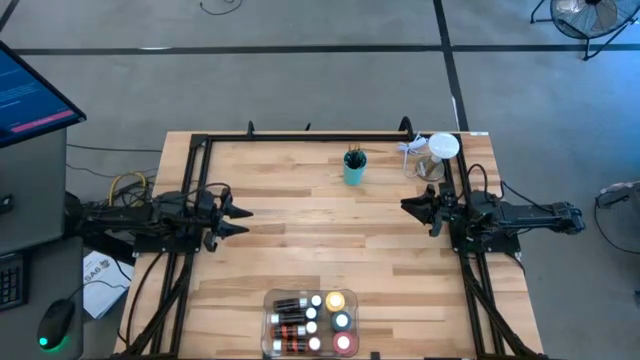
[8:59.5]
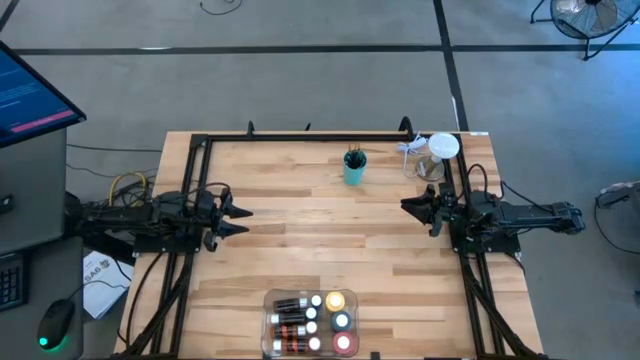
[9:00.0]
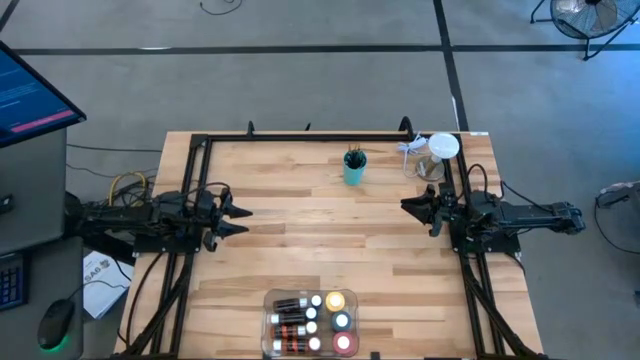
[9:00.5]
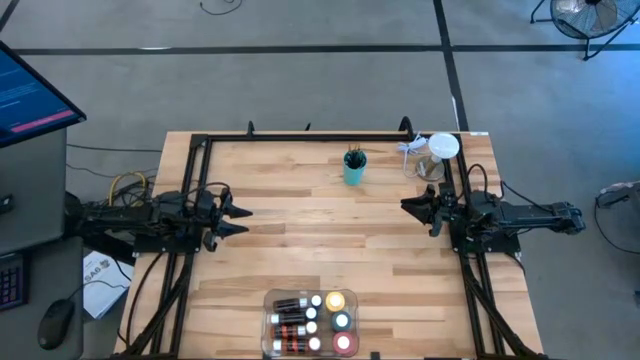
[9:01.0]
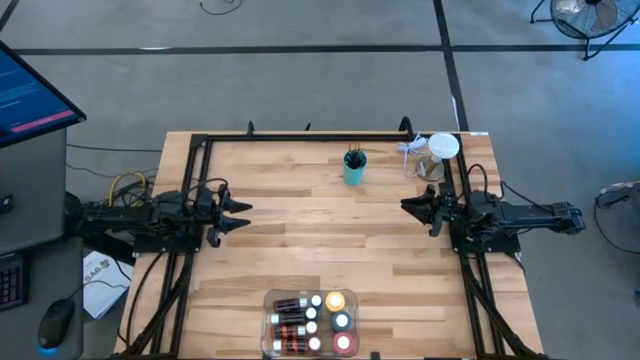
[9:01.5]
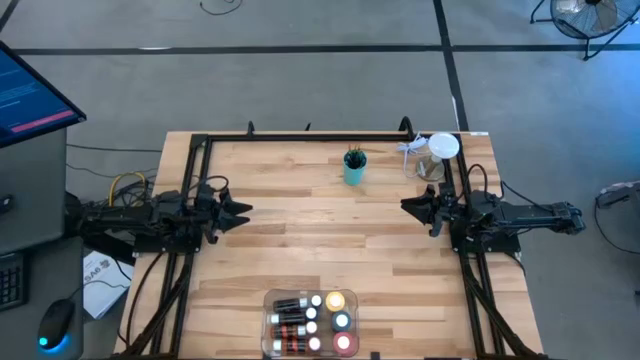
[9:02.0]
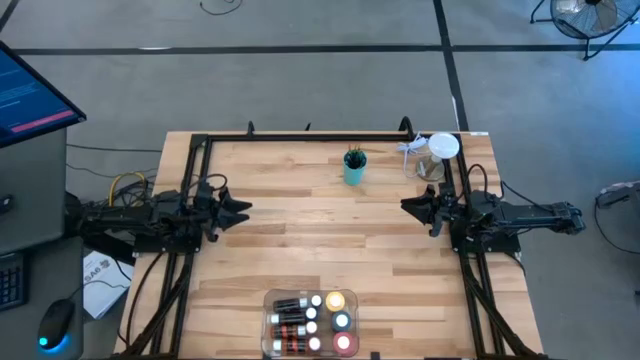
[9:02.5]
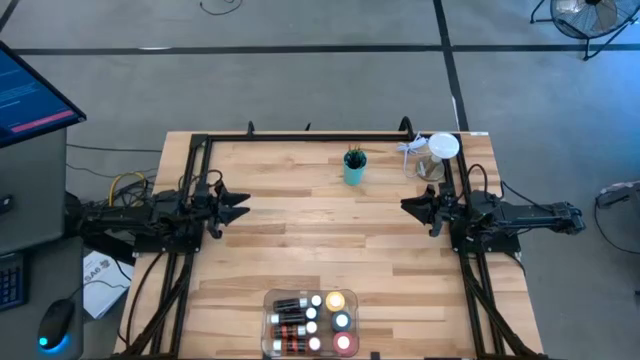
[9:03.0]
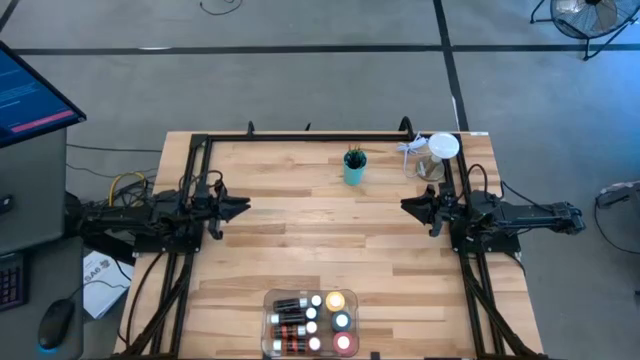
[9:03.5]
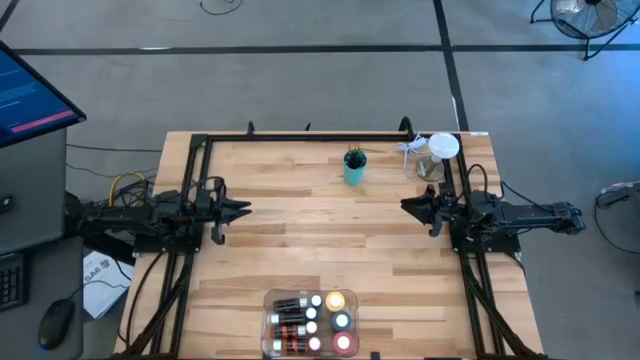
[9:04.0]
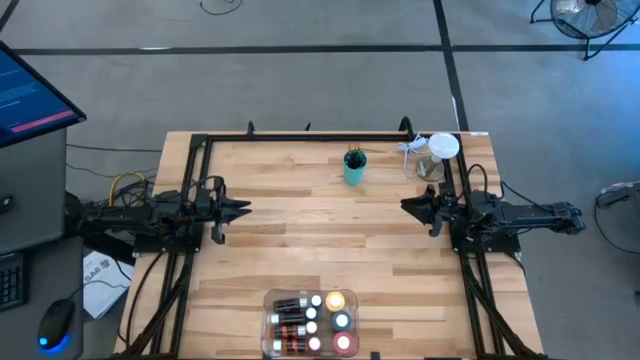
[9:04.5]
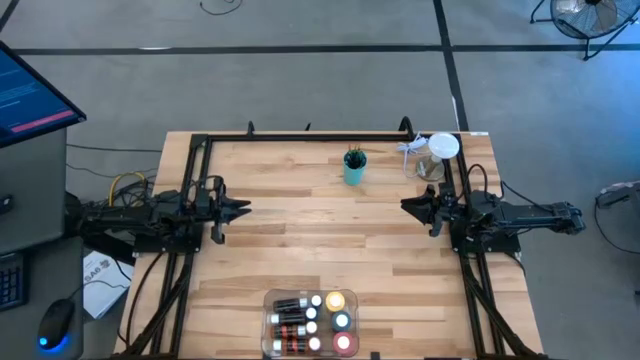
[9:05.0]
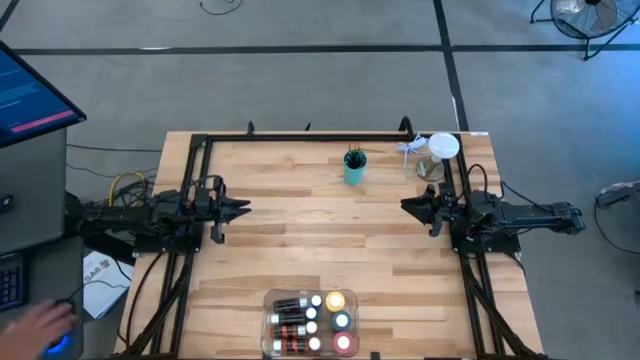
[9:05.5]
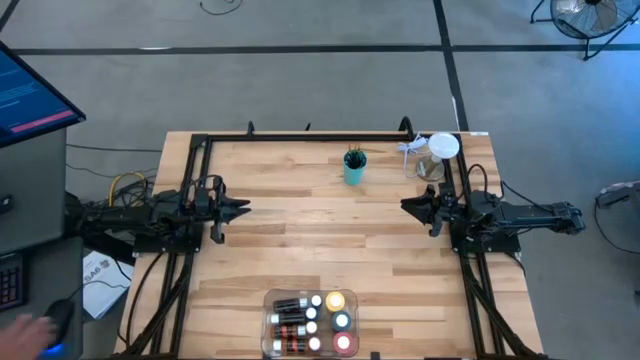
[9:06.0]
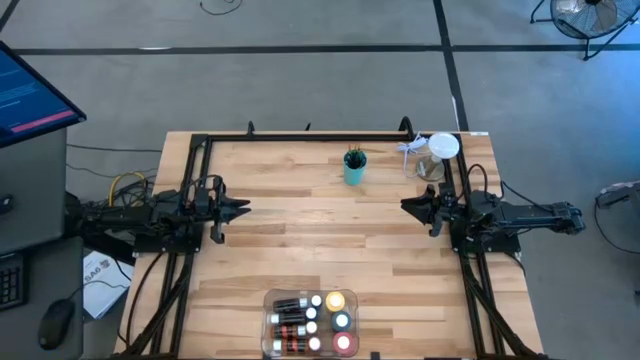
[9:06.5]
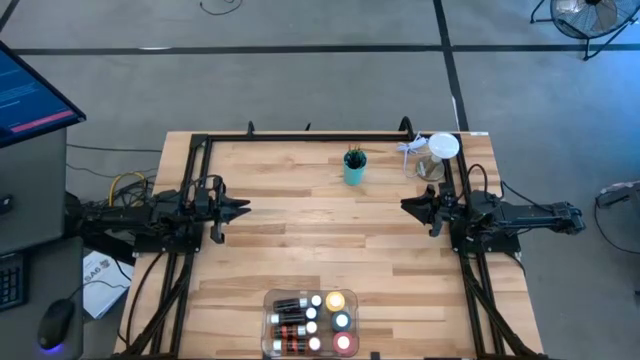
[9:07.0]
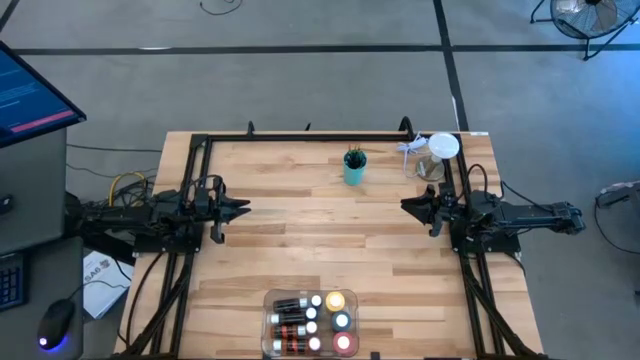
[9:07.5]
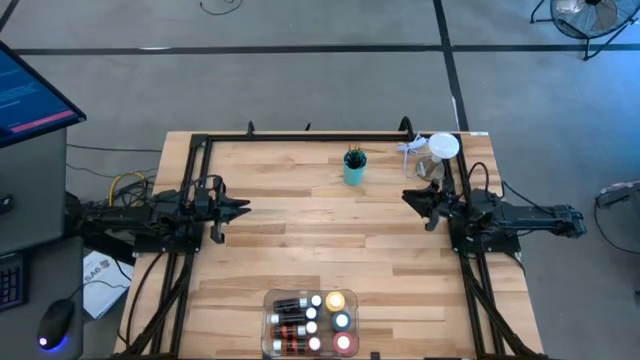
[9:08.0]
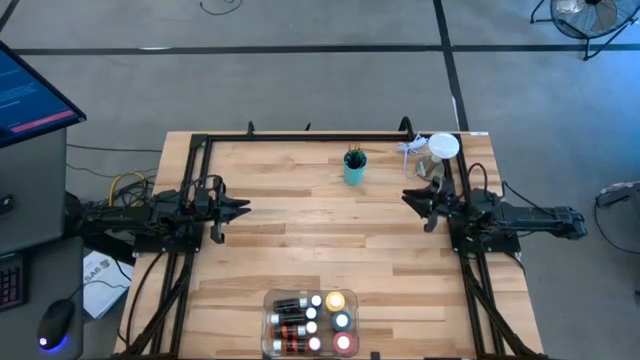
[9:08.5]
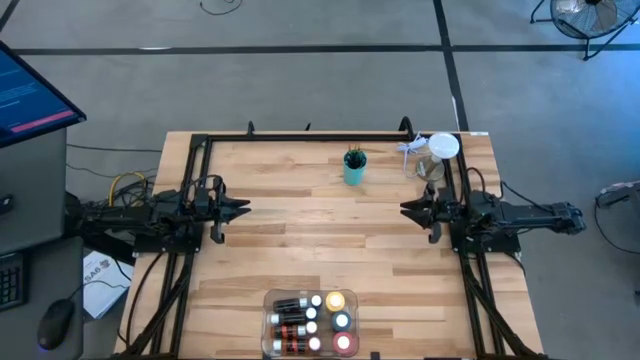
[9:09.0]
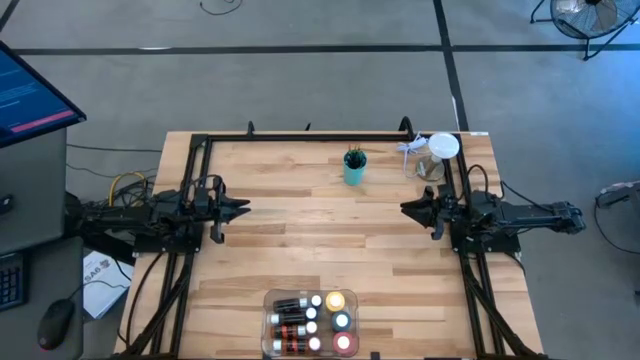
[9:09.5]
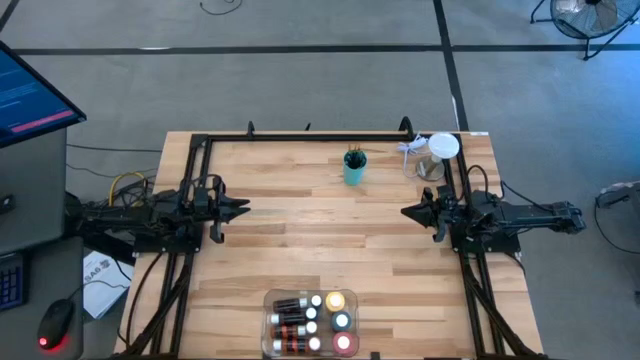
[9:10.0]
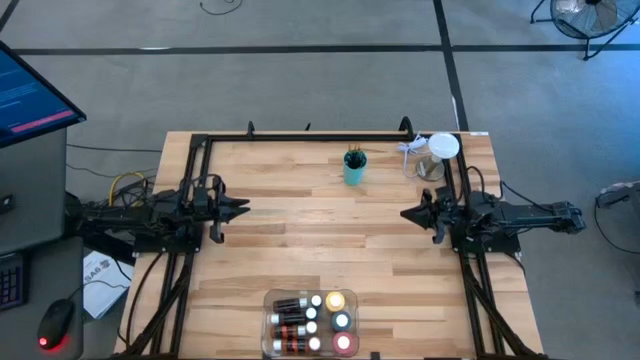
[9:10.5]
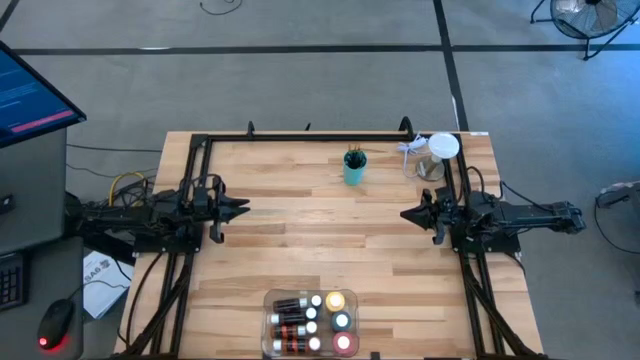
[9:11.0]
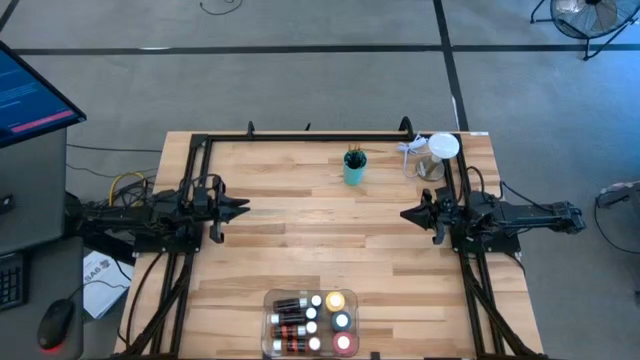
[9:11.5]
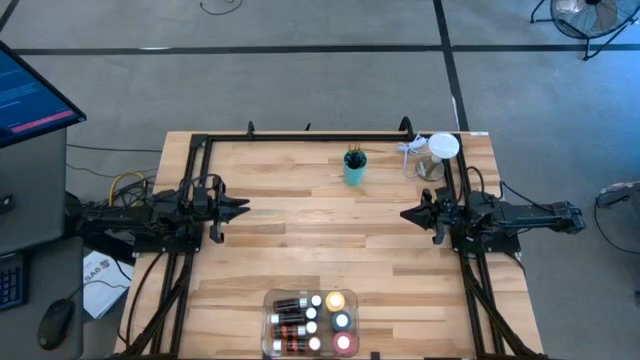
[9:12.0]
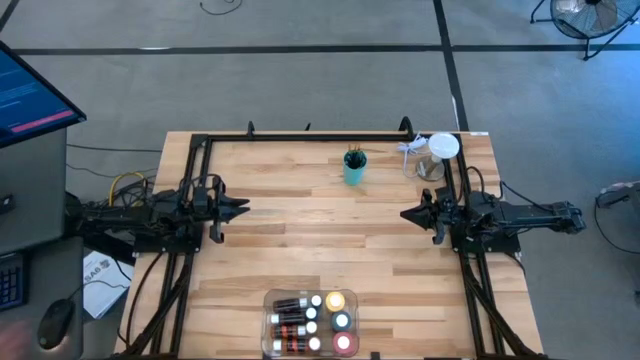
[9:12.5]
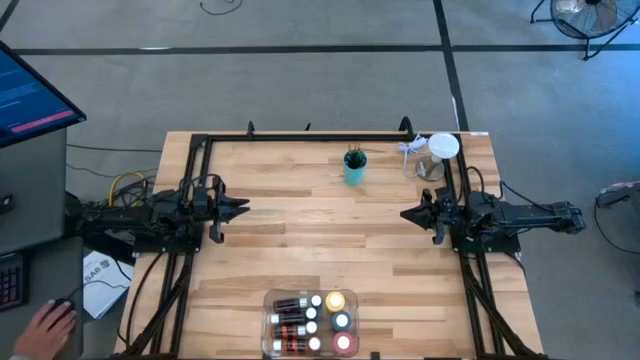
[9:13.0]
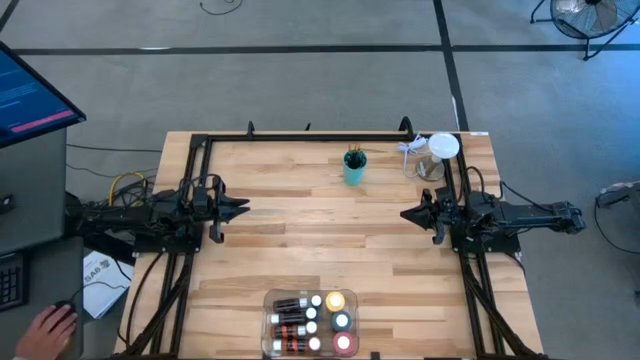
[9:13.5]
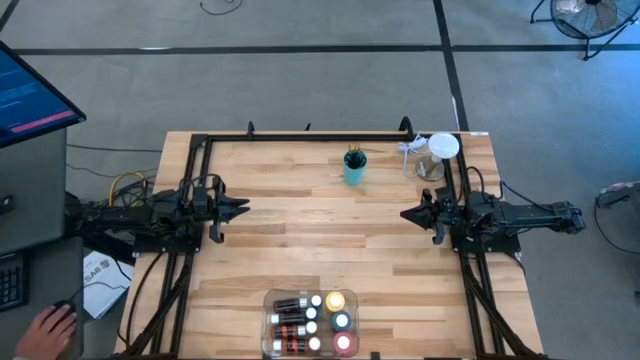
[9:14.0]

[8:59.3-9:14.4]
Task: Pick & Place Paint Supplies
Return to Home Position

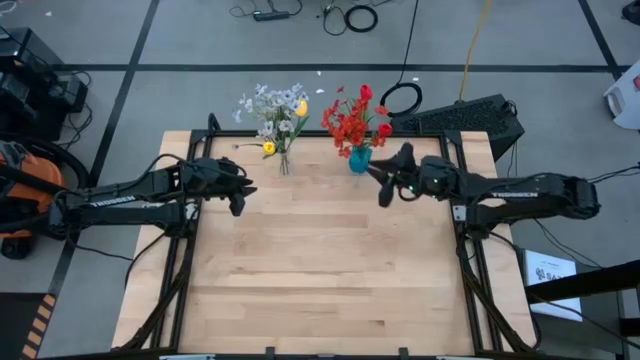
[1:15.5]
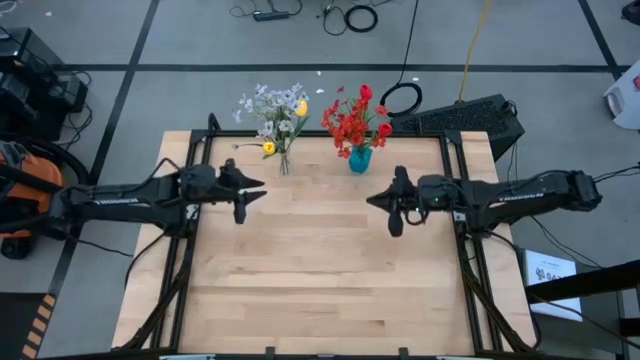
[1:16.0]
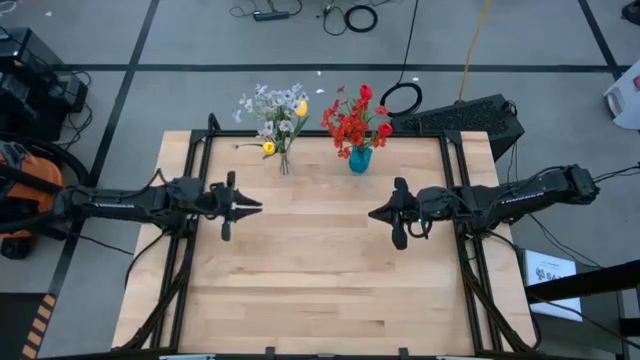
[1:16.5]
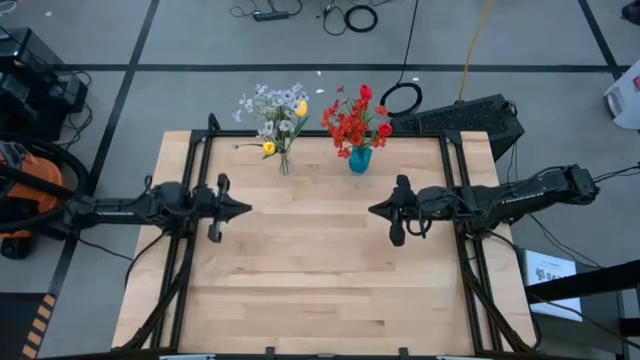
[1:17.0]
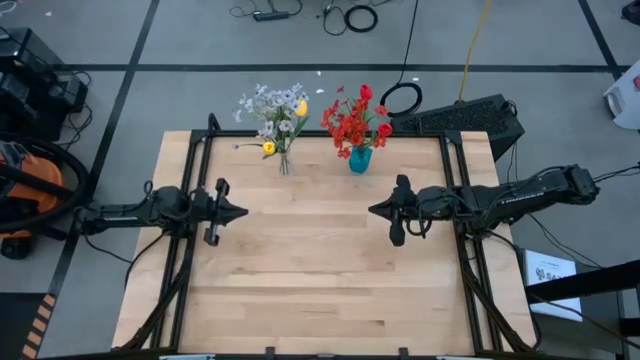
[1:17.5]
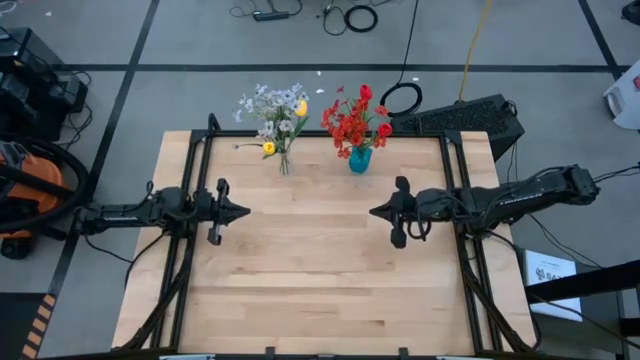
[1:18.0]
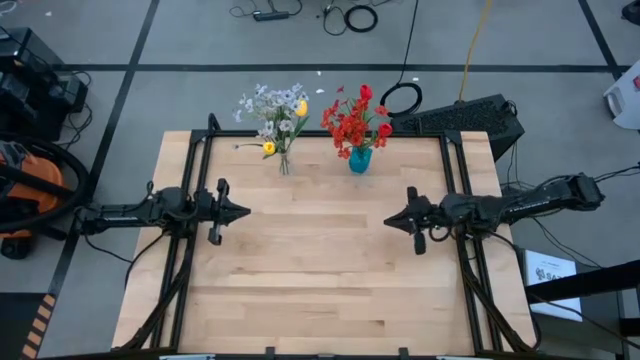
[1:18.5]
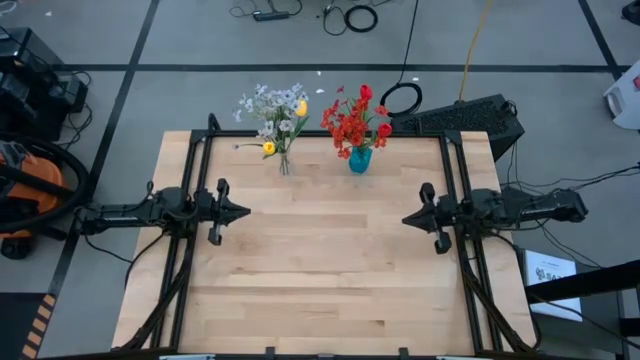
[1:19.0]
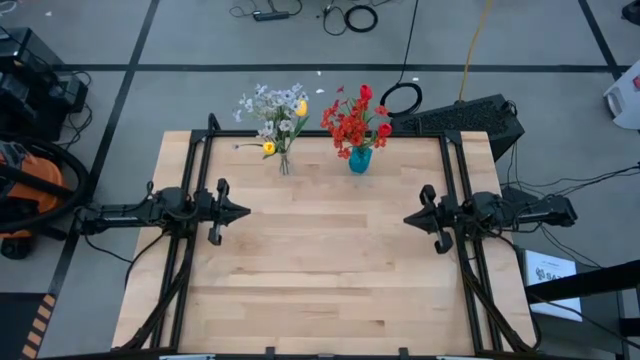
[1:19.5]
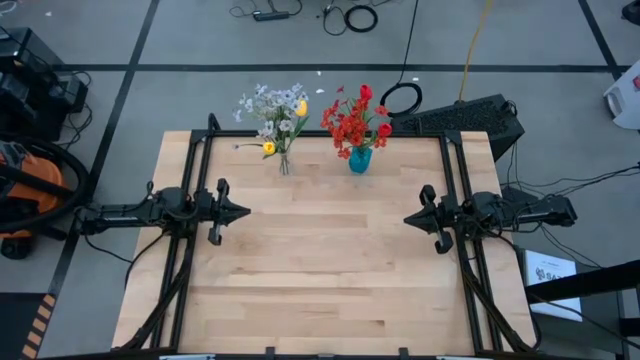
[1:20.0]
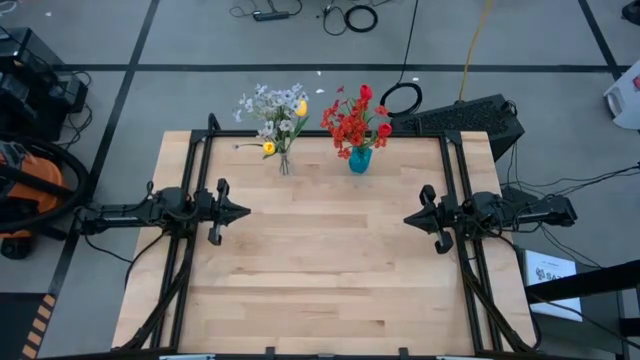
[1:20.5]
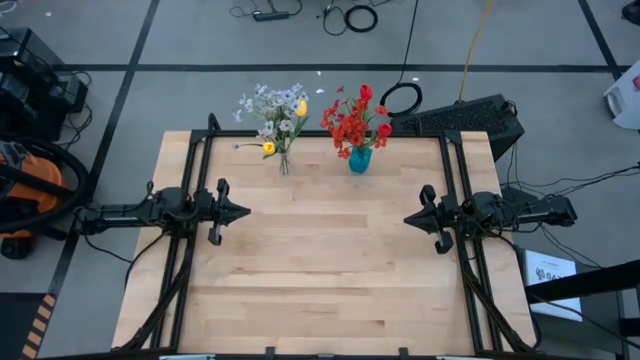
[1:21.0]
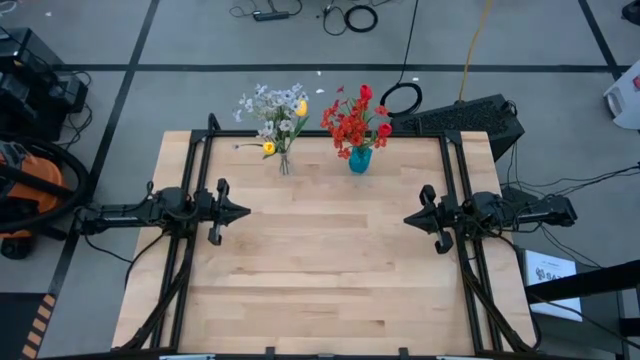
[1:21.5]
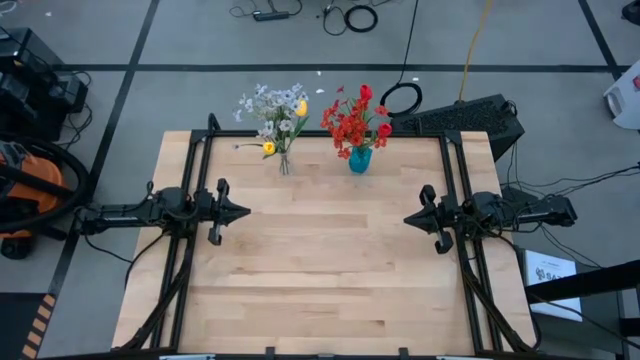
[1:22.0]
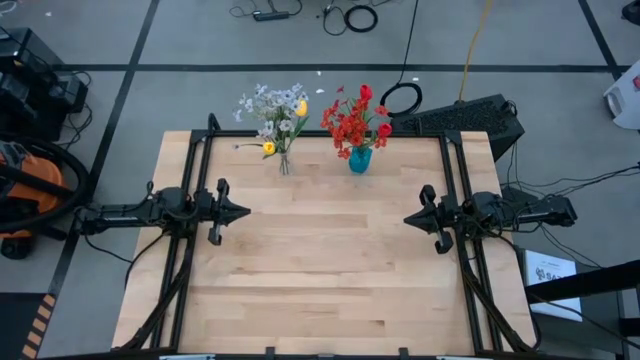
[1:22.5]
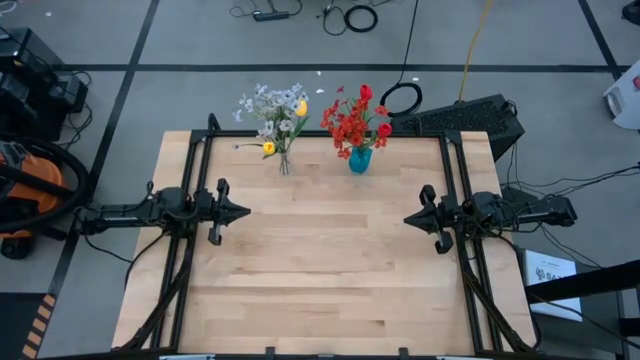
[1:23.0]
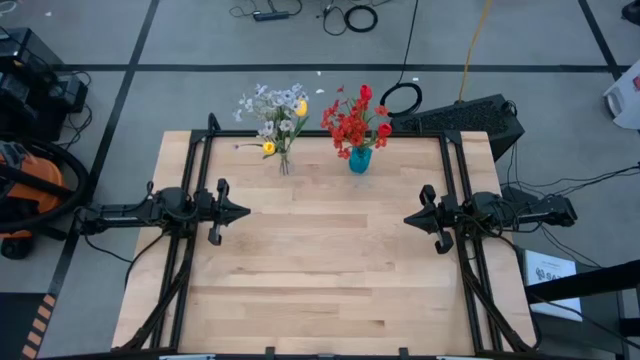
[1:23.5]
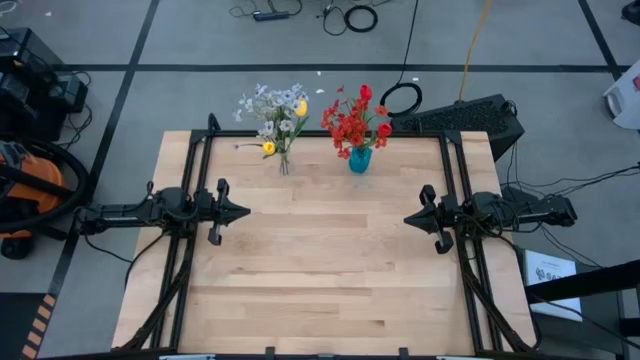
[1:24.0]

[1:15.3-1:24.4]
Task: Sort flowers into vase by color
Return to Home Position
